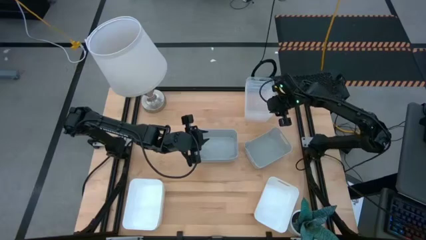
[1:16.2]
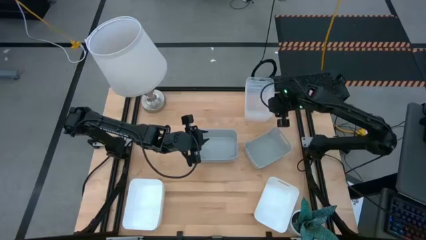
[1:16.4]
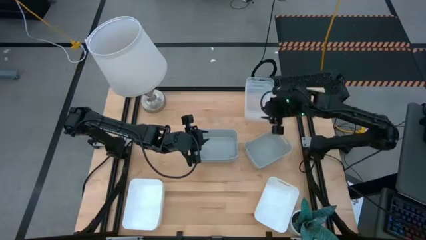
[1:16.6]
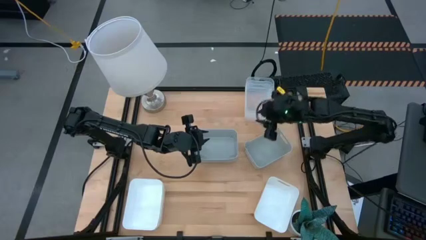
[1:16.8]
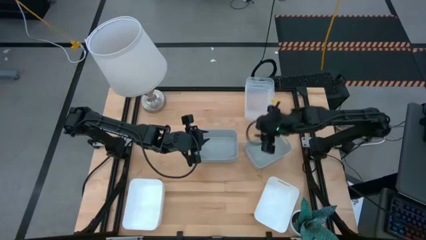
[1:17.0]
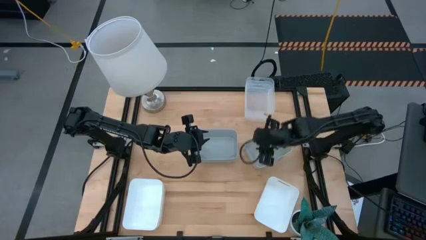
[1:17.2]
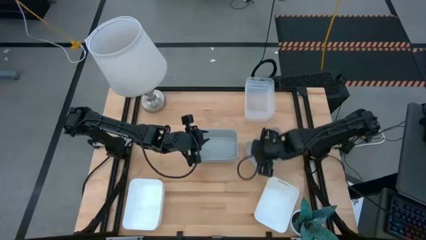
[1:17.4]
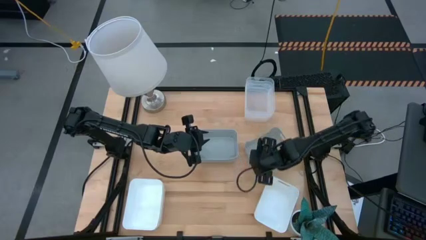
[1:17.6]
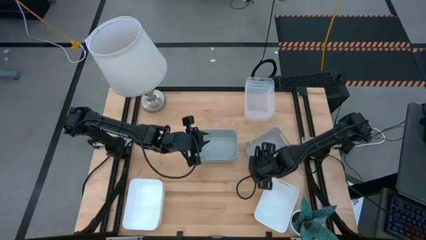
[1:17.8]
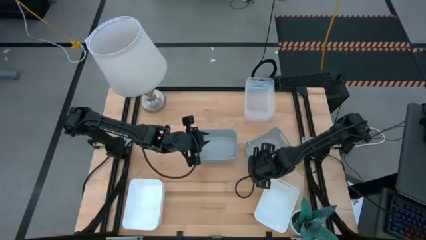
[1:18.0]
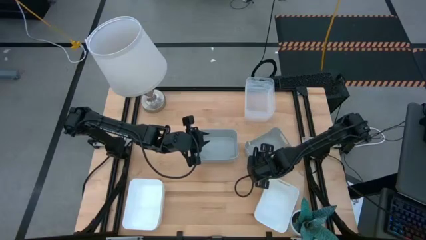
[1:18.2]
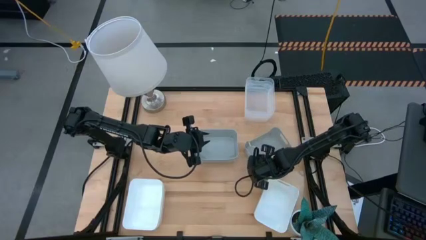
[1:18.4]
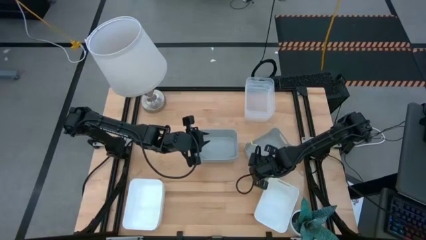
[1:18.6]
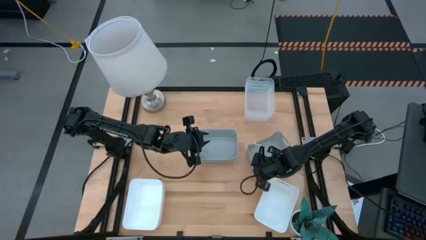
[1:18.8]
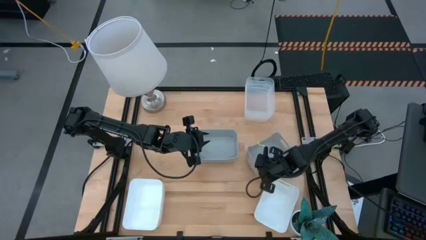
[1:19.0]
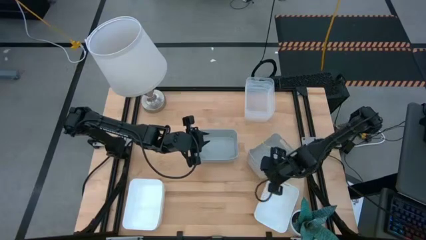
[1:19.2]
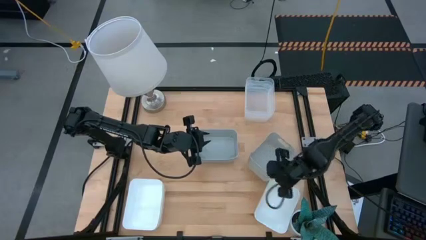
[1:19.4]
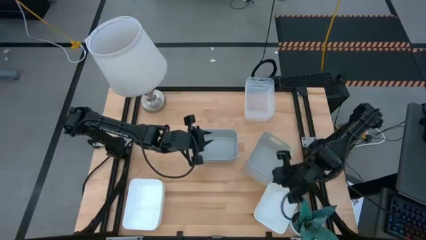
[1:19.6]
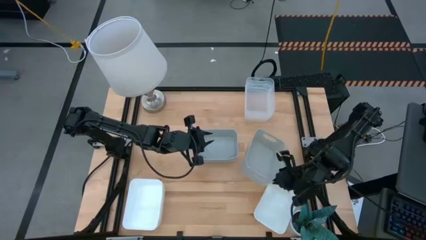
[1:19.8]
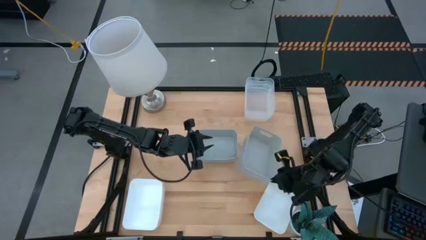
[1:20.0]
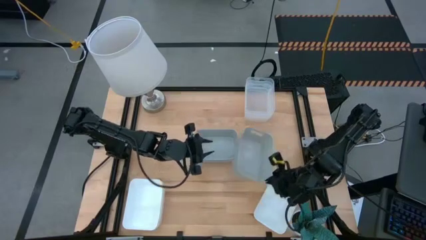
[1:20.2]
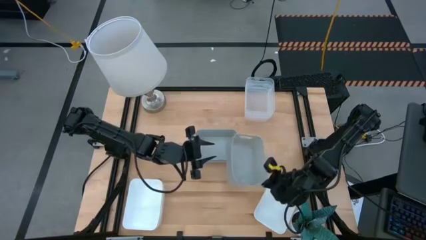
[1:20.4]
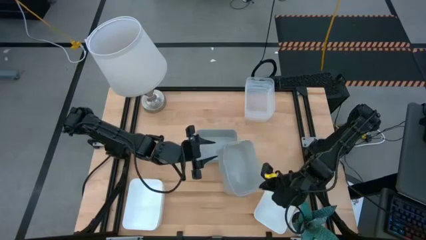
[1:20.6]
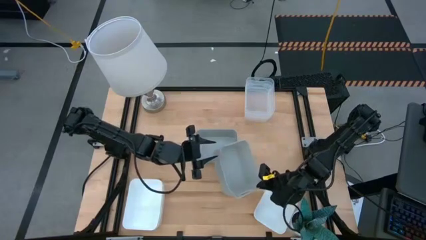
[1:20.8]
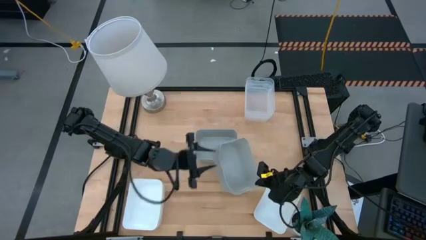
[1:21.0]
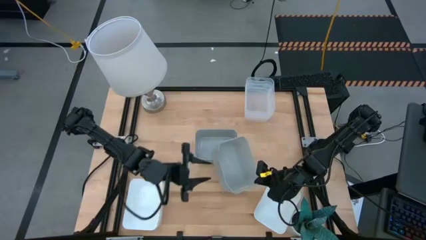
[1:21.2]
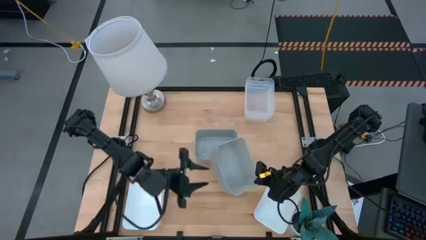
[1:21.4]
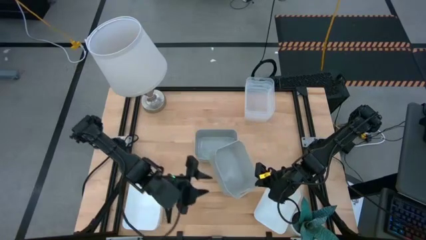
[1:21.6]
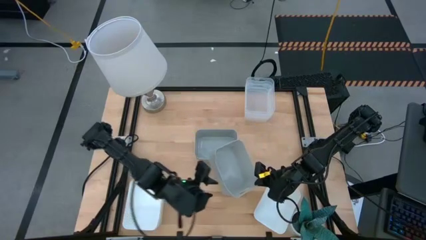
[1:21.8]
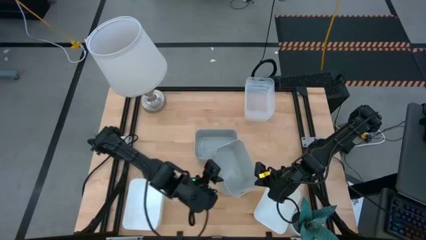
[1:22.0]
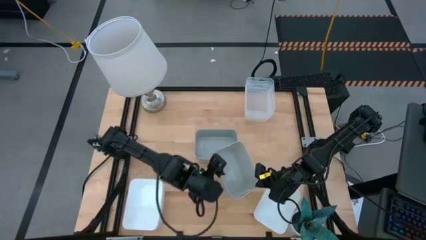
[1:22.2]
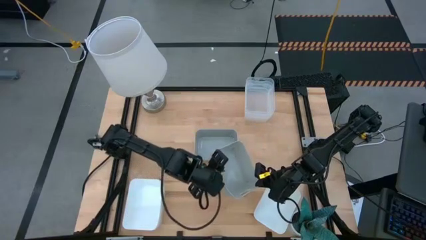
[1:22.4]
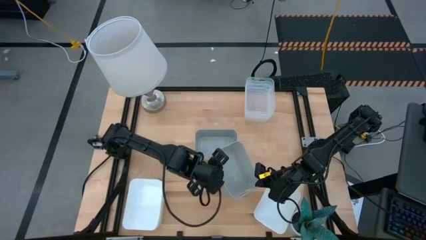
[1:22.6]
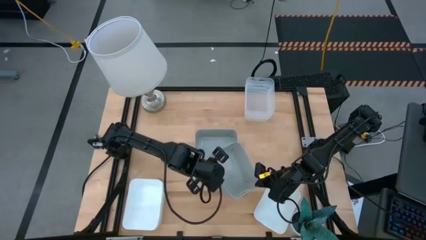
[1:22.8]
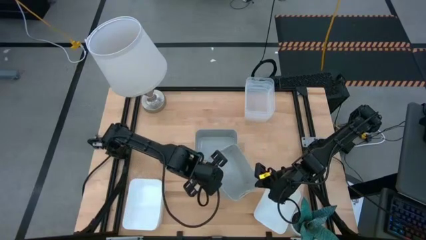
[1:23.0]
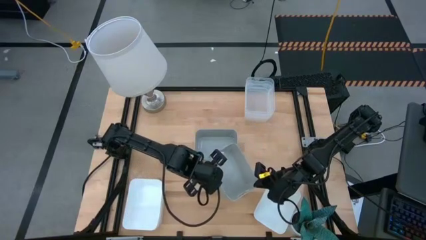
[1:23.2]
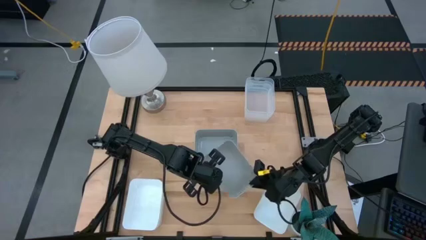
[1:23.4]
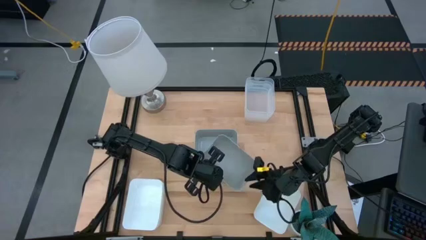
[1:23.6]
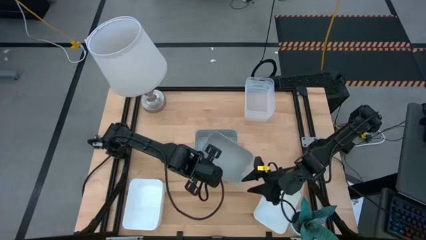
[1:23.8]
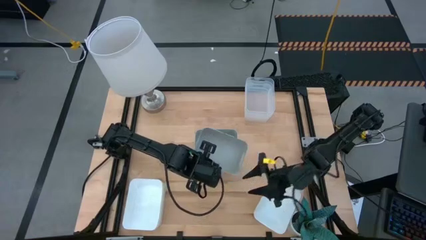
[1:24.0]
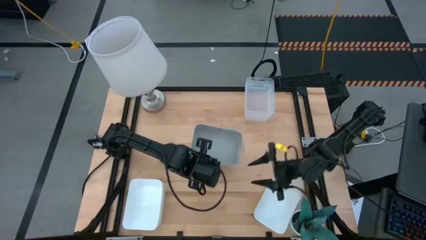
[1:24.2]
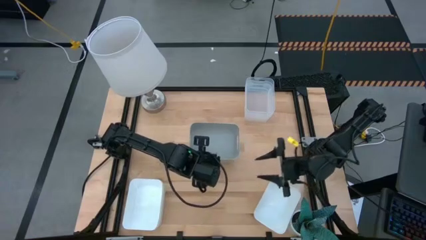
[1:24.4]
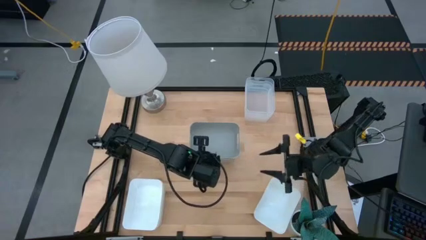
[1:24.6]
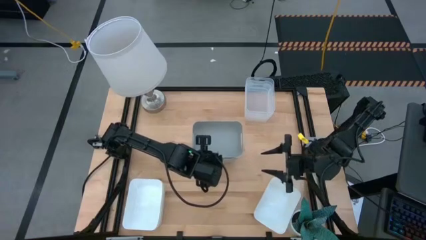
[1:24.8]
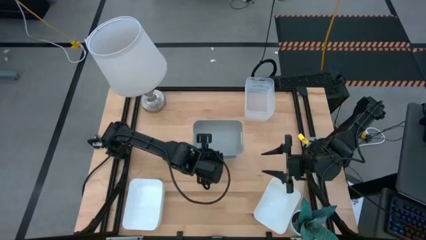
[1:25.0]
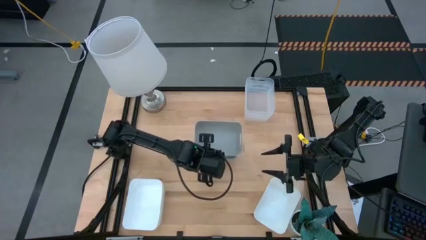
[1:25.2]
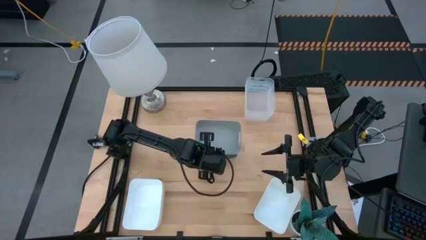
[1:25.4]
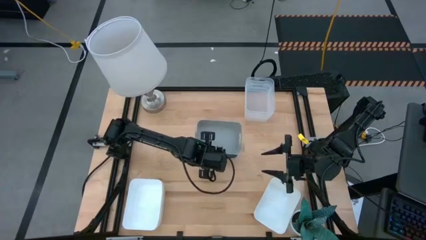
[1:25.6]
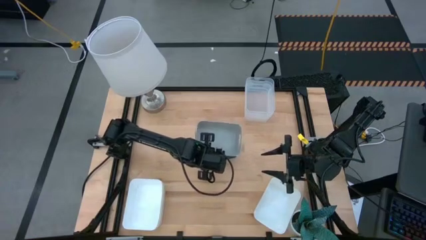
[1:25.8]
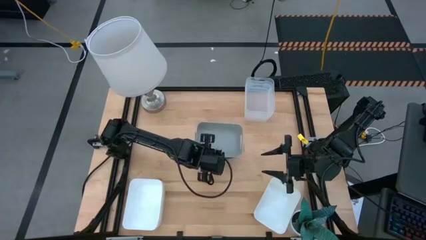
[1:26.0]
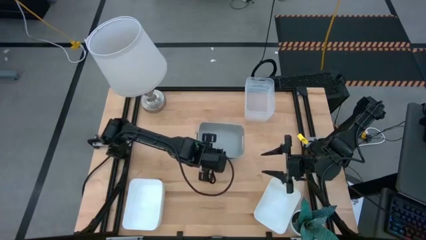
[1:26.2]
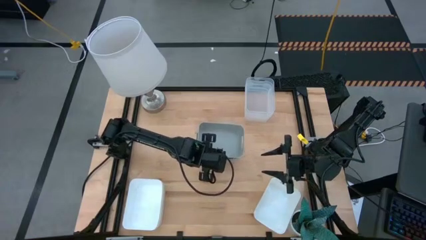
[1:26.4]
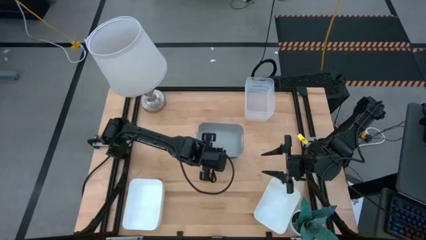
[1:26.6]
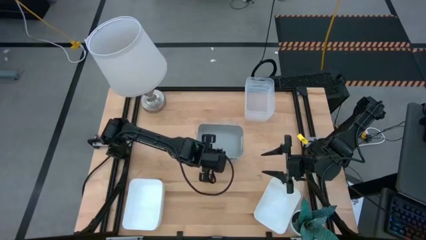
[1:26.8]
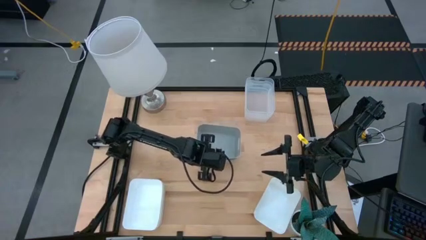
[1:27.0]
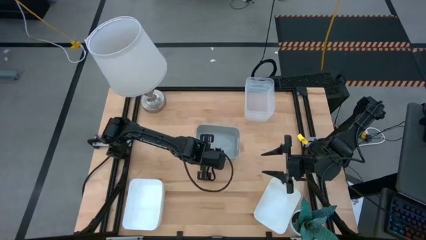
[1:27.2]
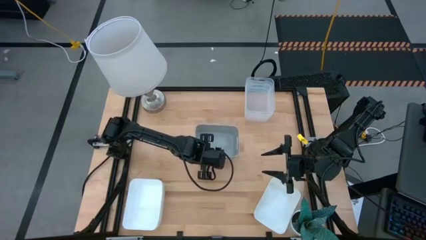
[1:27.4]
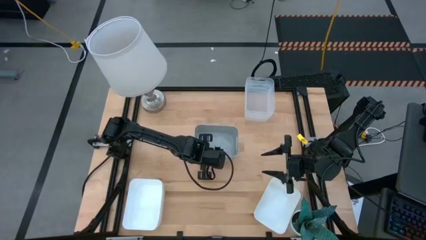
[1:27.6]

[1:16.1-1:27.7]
Stack the gray bin on the stacked gray bins
